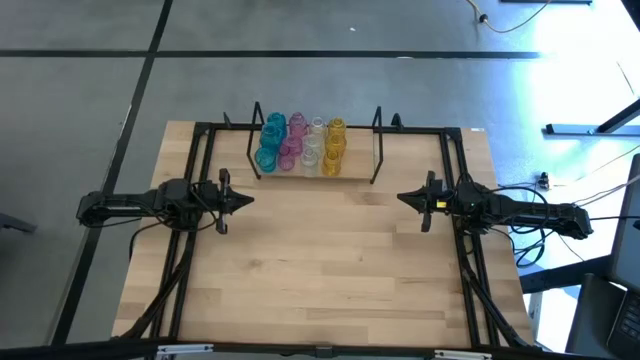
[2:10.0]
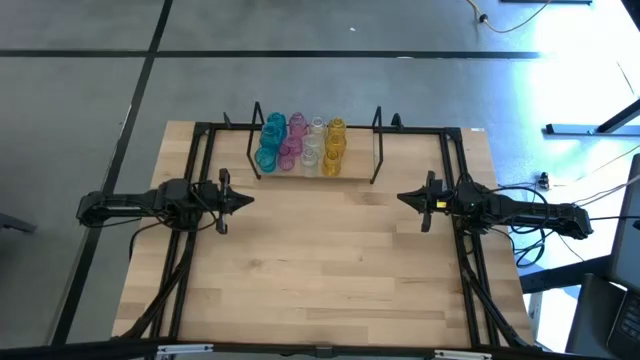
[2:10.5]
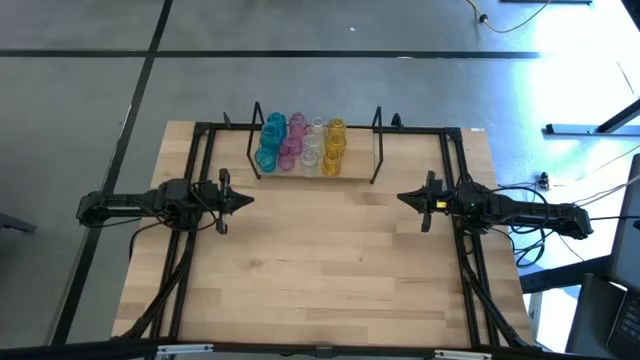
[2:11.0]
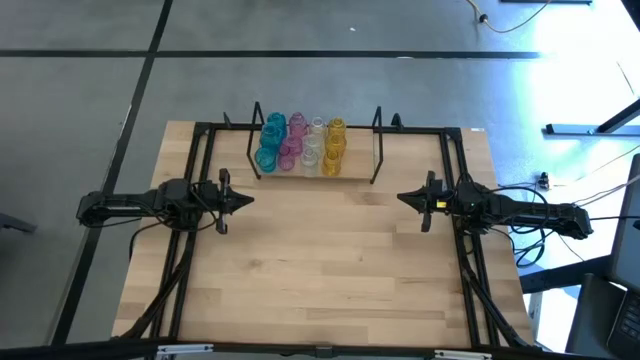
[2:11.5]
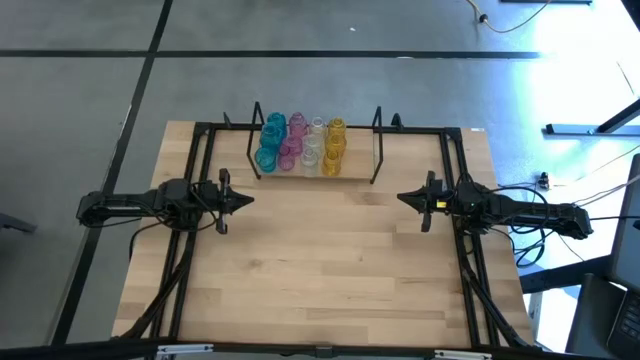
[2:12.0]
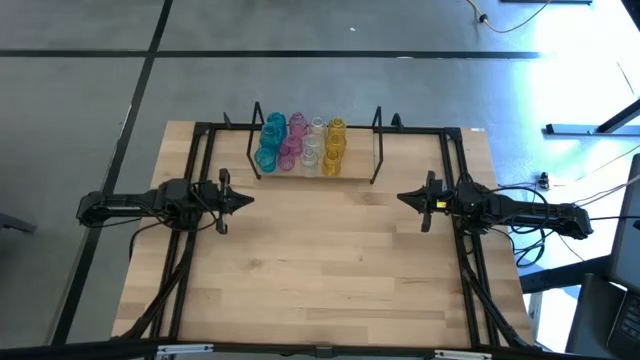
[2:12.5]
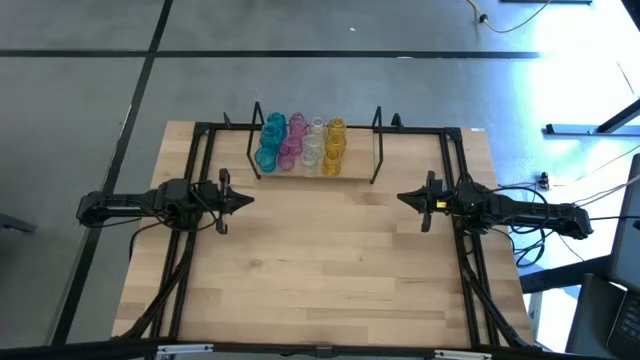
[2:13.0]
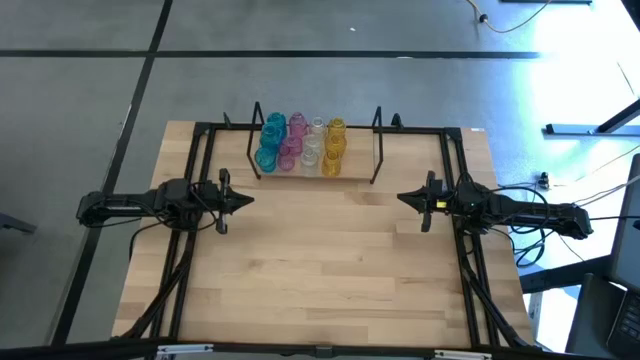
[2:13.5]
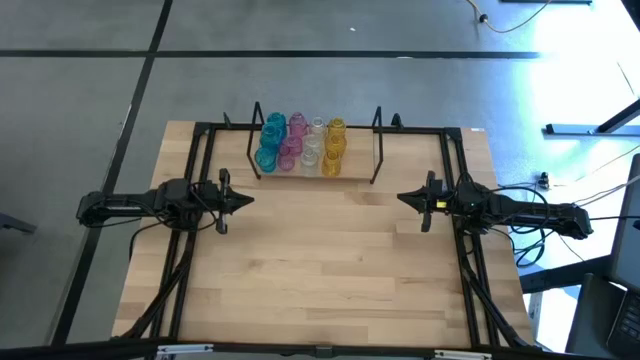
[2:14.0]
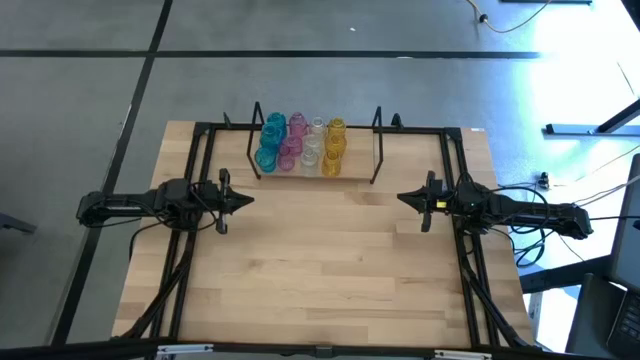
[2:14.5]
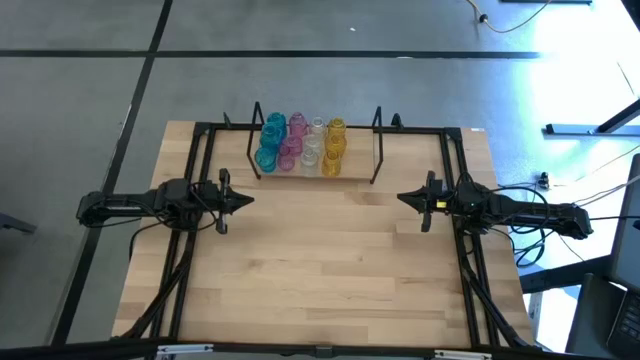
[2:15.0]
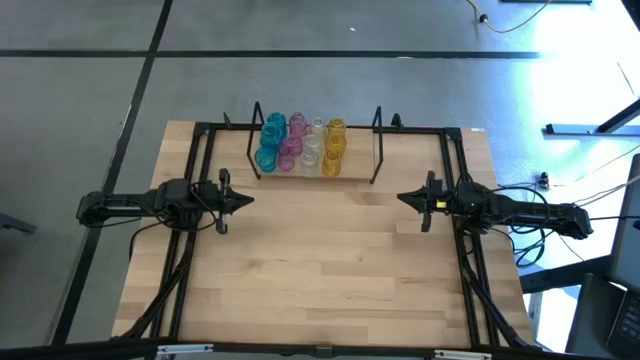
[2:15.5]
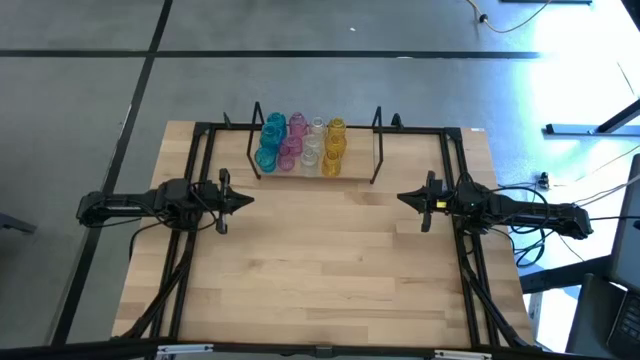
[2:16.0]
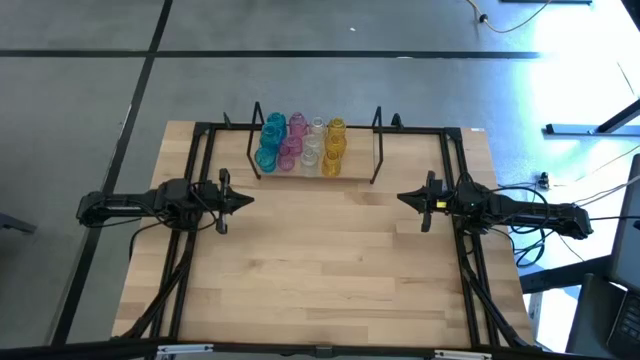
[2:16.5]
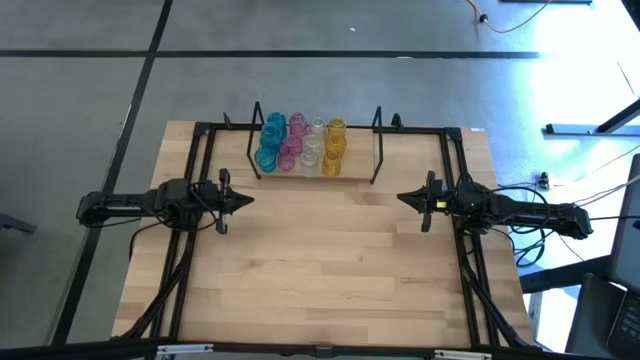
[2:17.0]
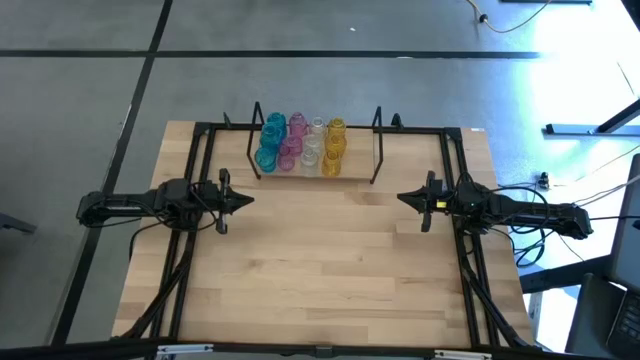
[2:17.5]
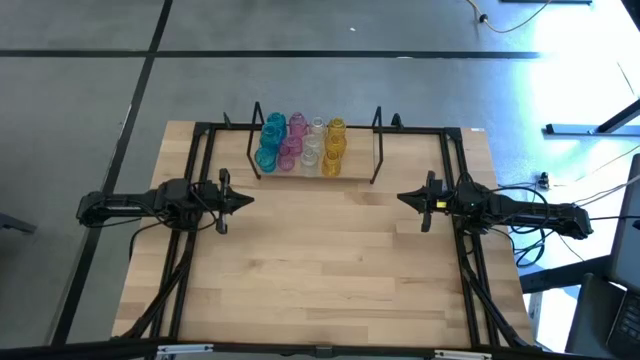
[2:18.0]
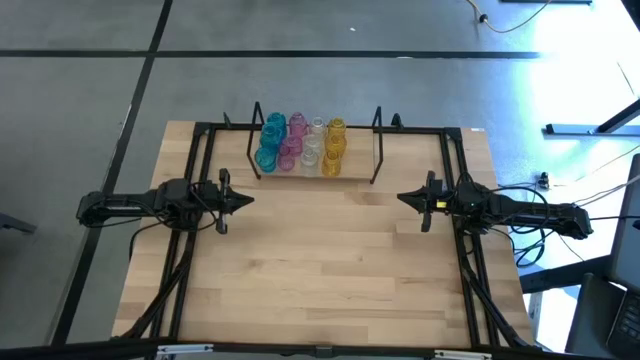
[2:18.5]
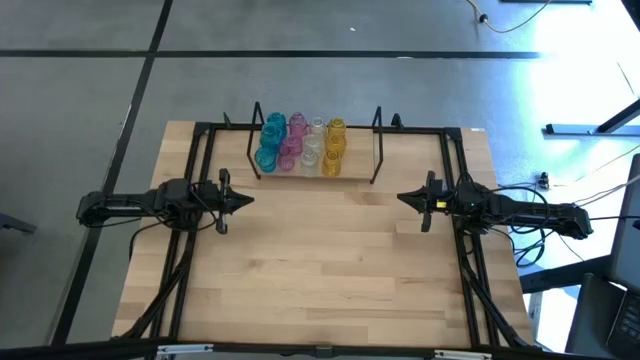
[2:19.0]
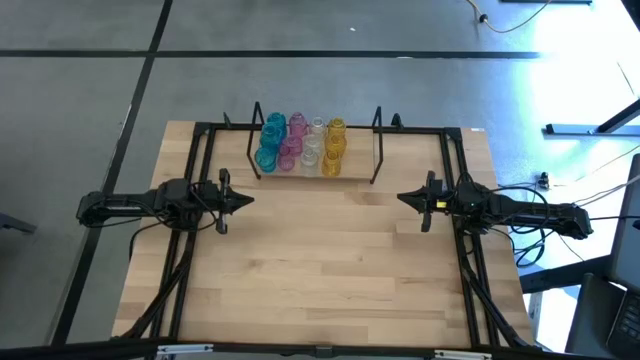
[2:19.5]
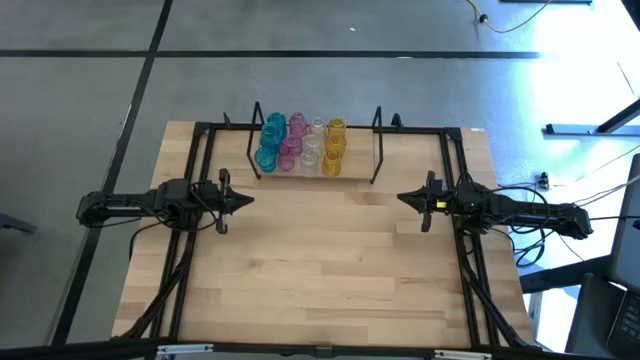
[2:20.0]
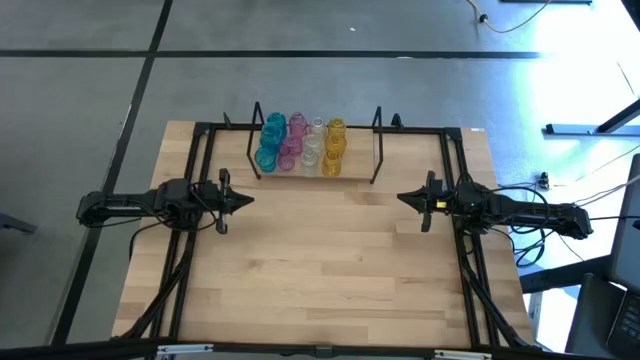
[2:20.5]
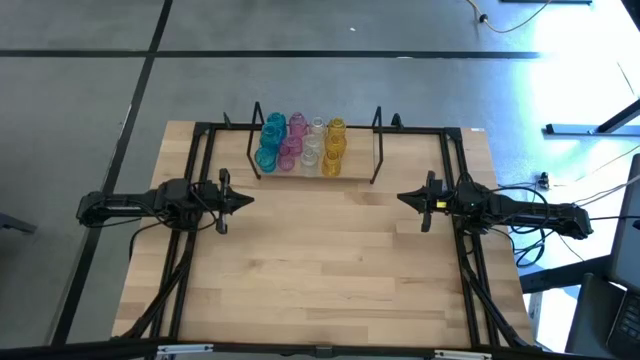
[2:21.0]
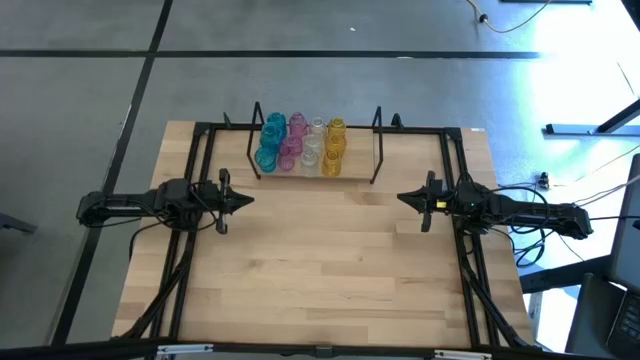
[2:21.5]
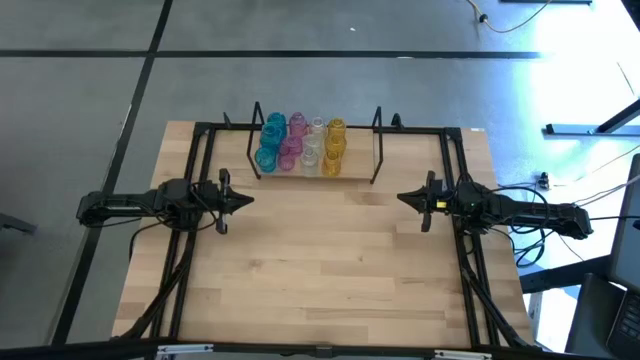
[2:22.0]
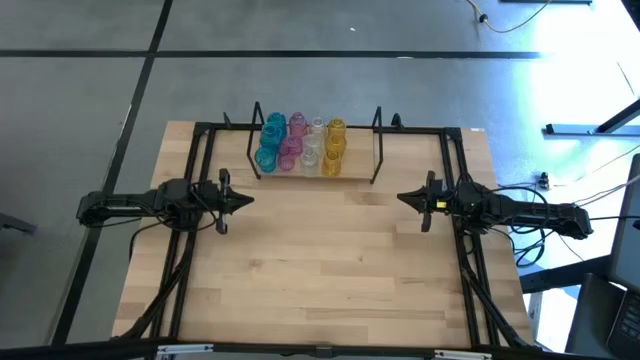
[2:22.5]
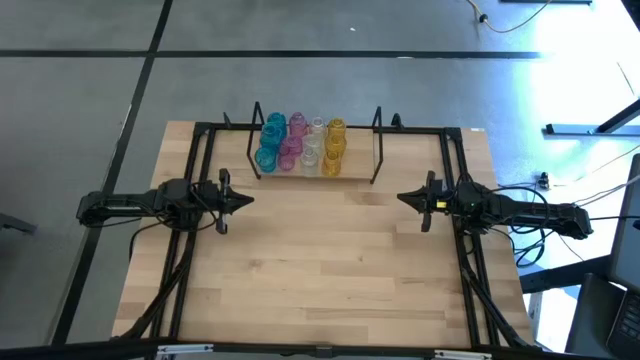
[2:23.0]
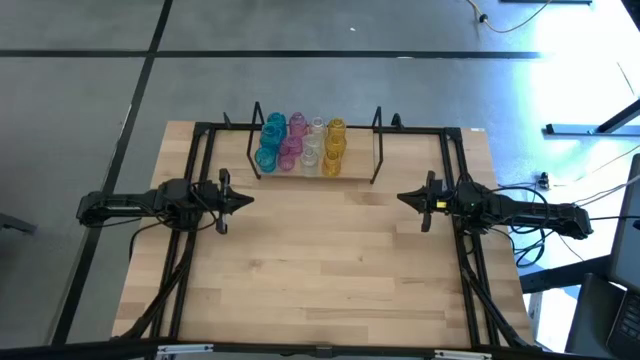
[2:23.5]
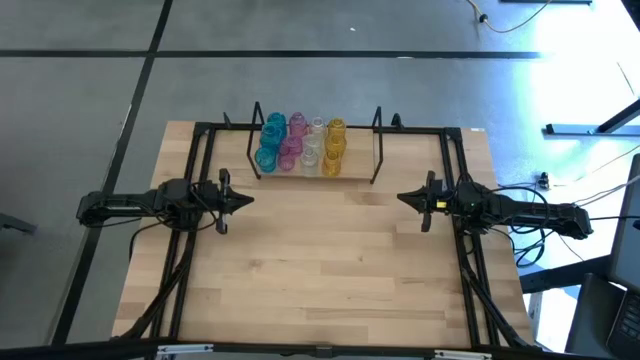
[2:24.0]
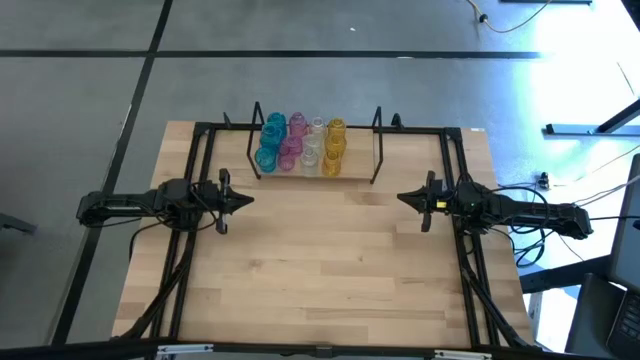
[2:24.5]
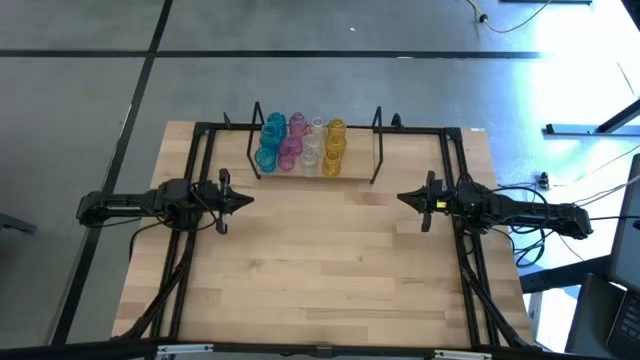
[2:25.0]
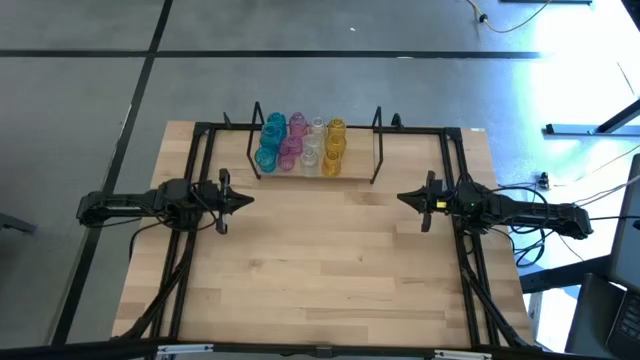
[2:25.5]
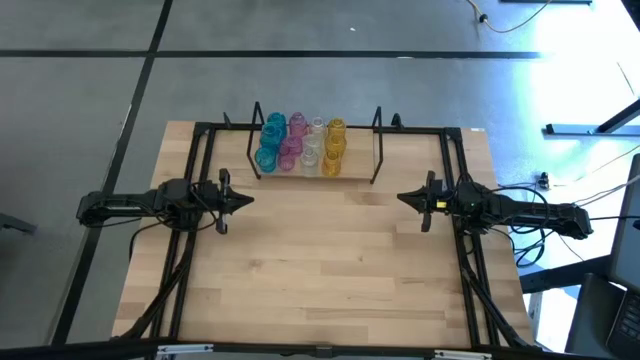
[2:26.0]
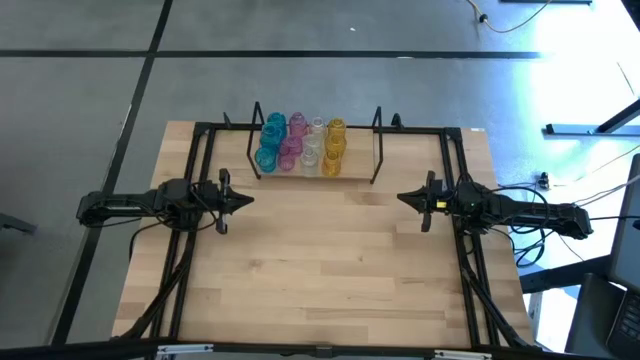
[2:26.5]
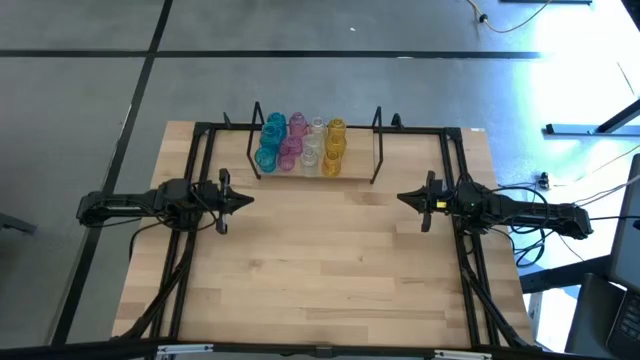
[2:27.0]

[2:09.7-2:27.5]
Task: sort vases onto shelf
Return to Home Position

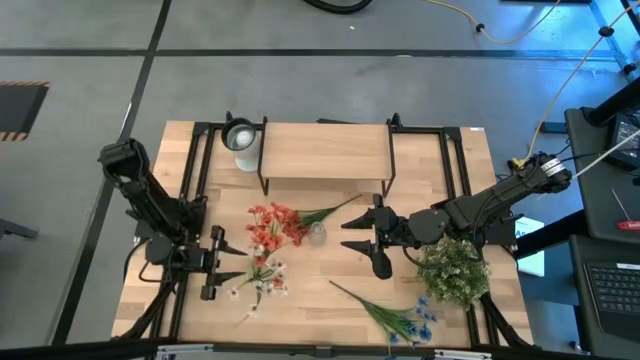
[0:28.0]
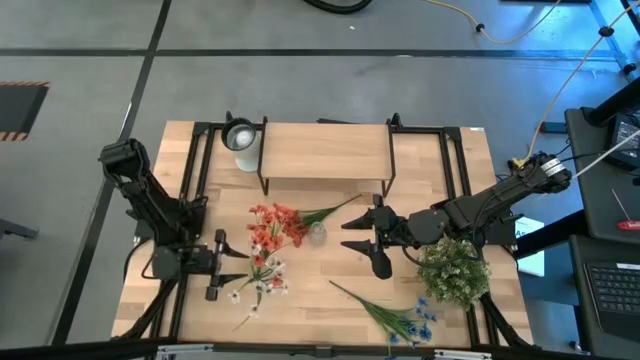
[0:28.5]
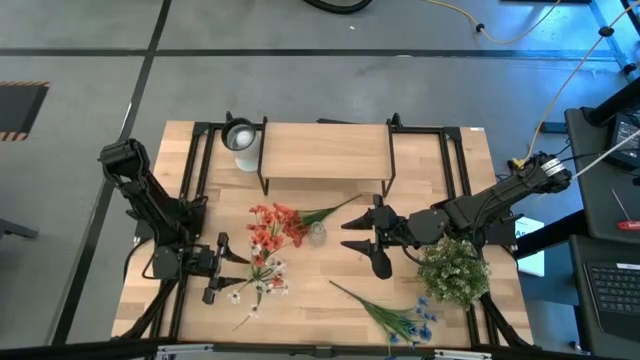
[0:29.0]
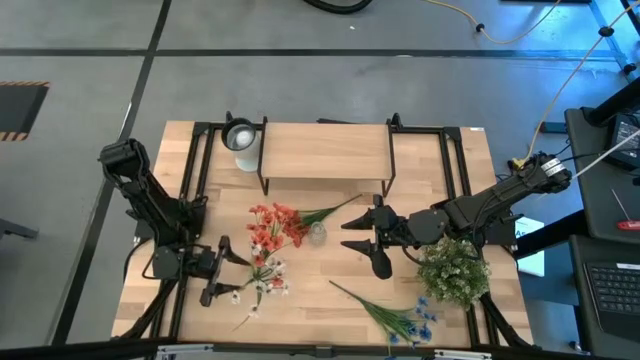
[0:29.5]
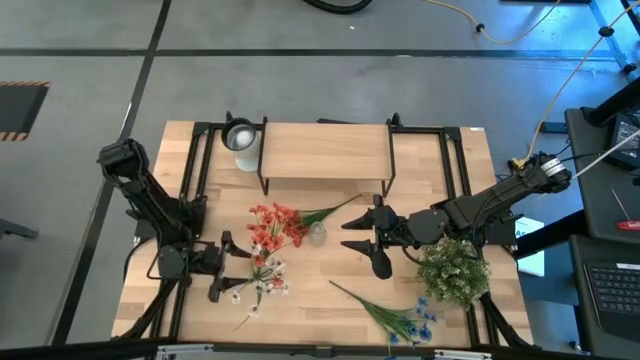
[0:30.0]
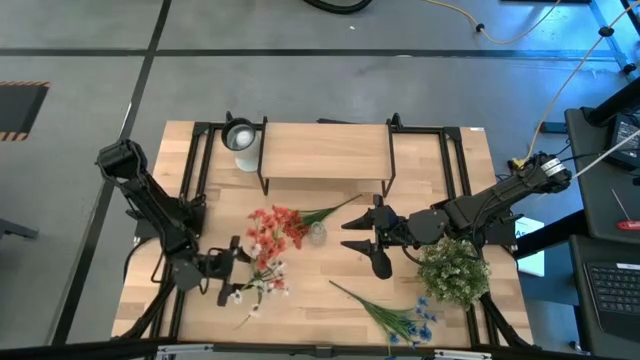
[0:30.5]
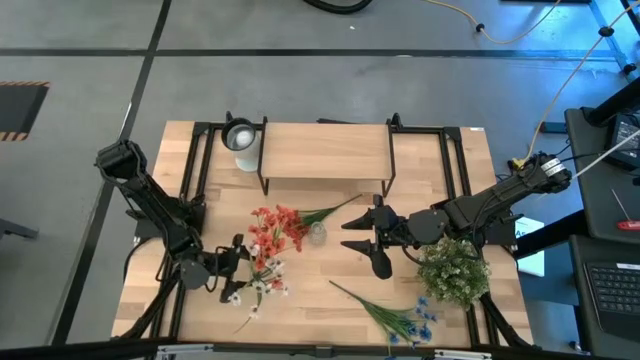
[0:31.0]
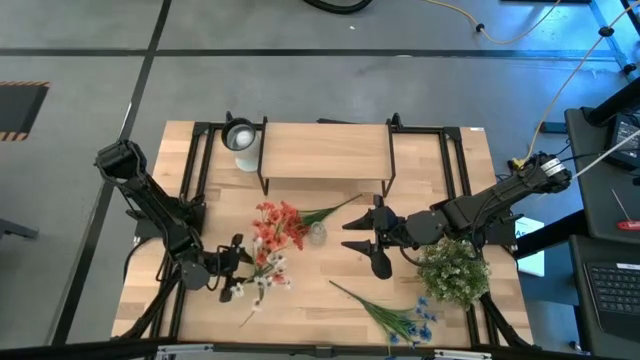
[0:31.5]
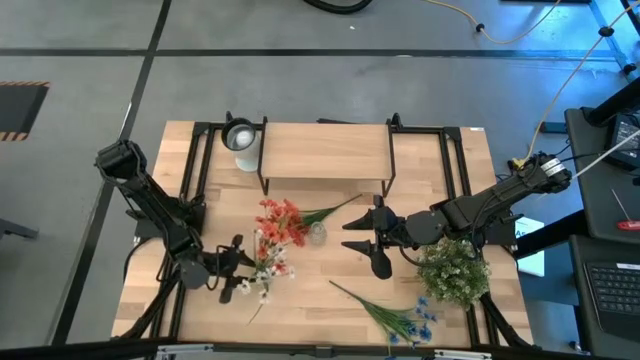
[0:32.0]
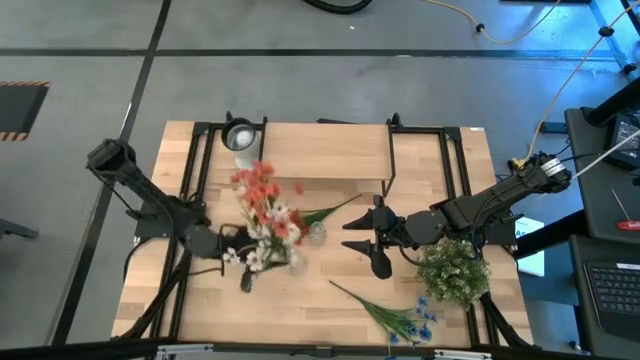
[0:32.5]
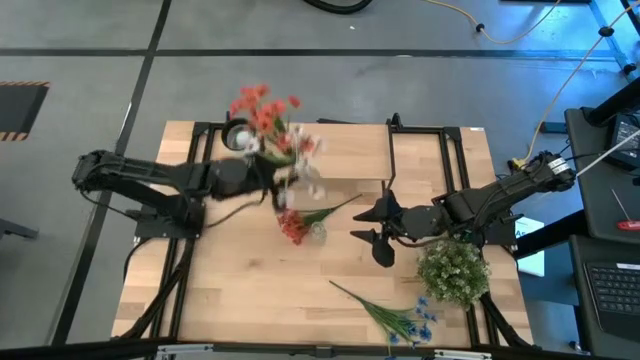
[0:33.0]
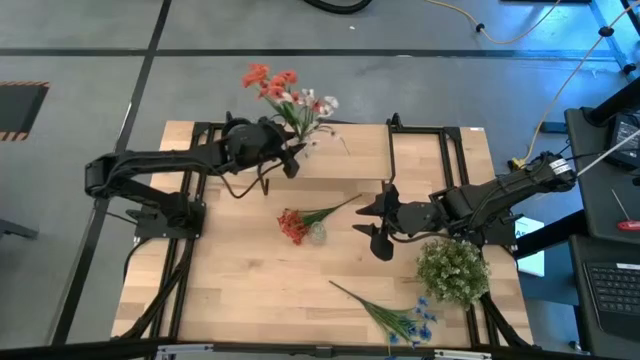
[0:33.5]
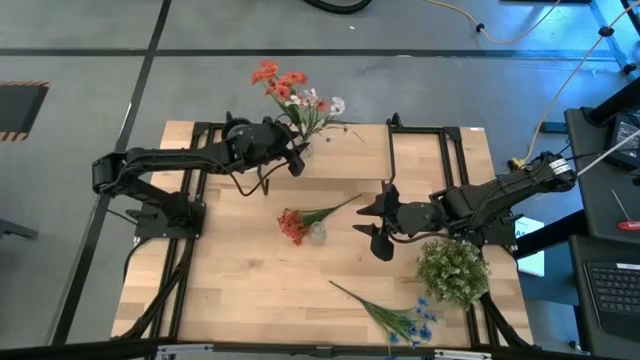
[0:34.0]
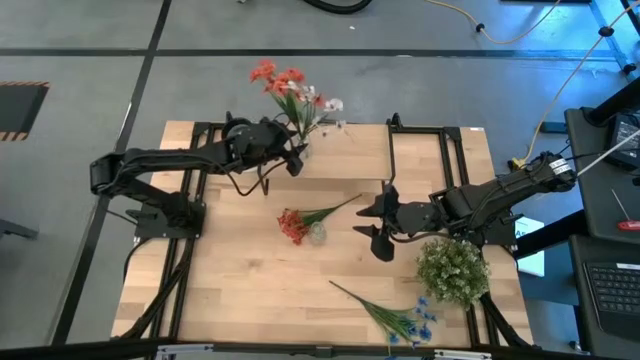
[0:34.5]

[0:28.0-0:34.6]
Task: Pick and place flowers into a vace then onto a shelf
Put the transparent vase with flowers on the shelf
